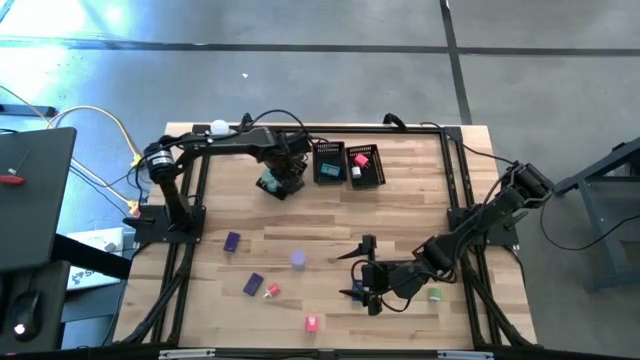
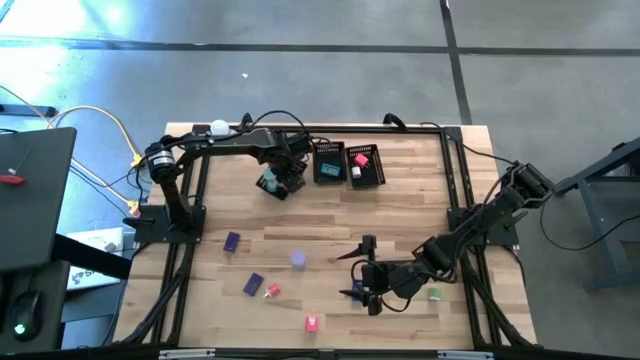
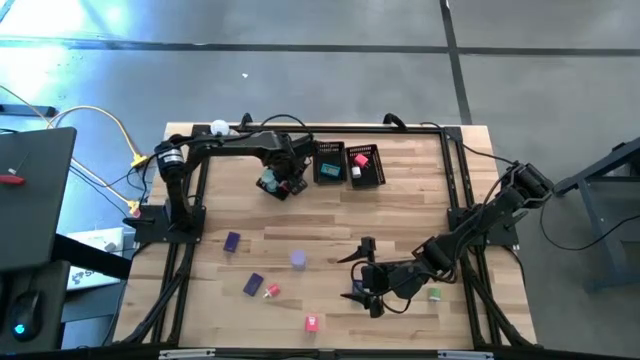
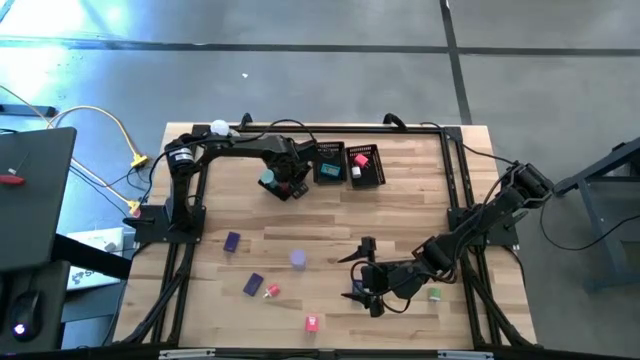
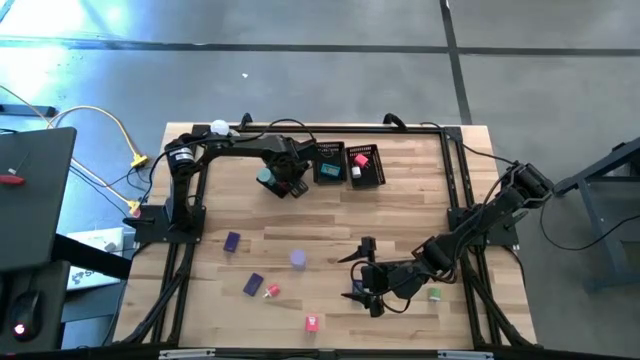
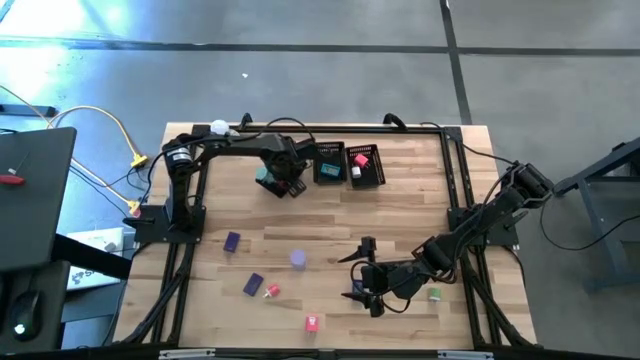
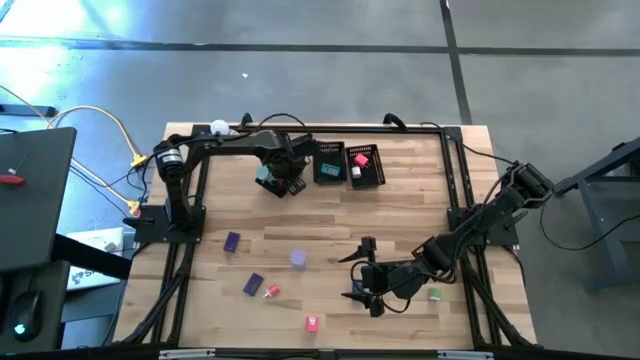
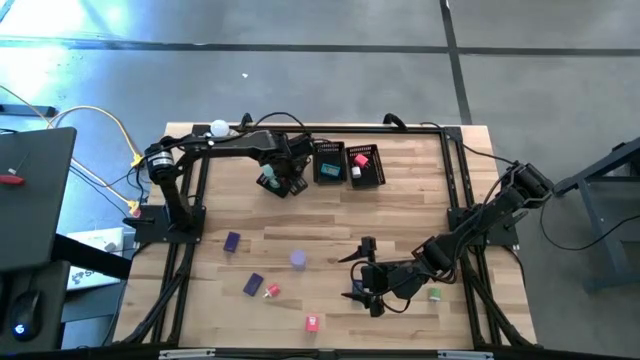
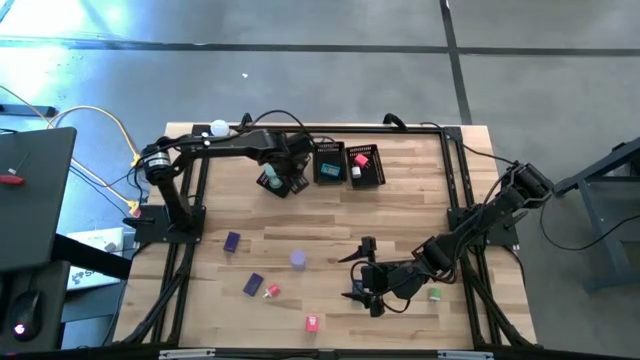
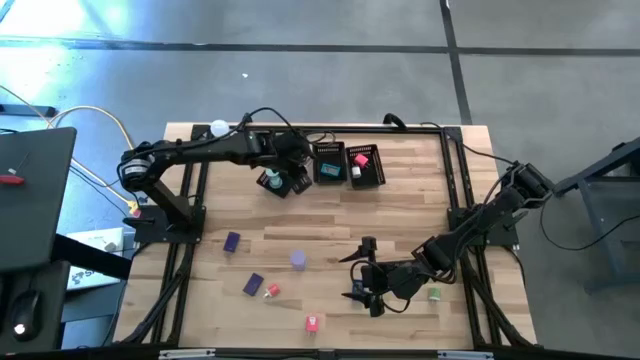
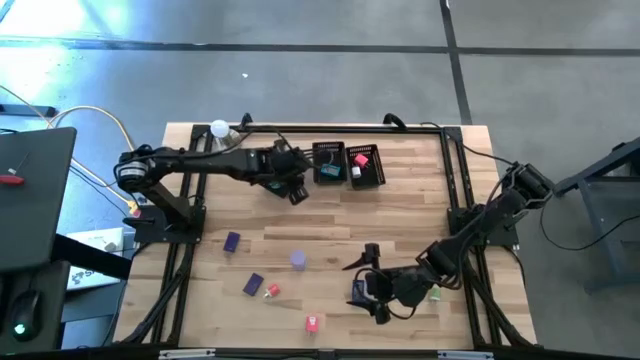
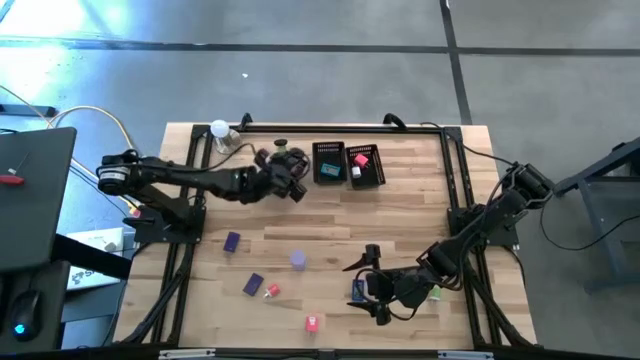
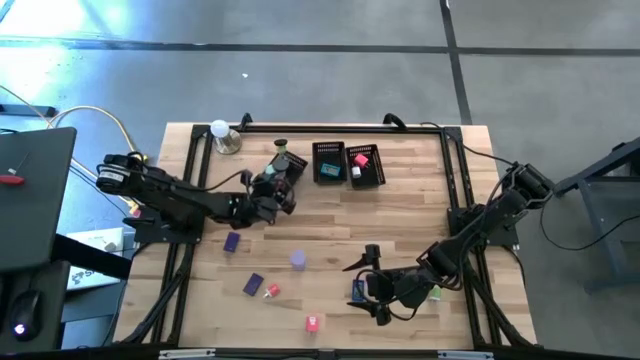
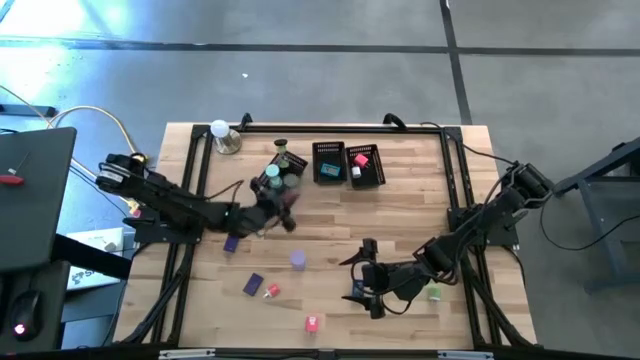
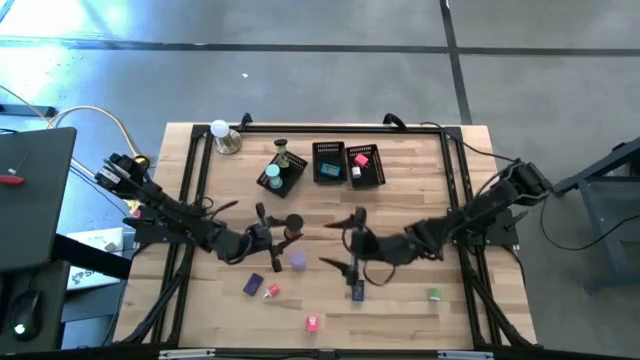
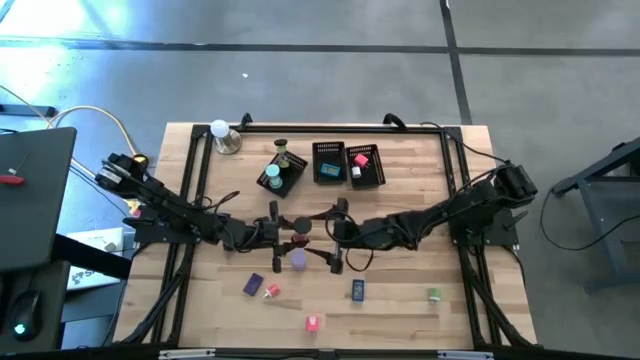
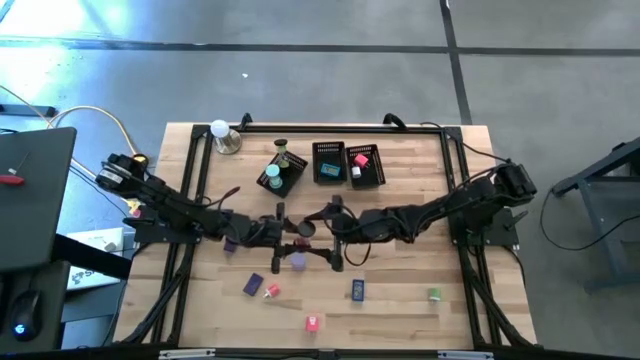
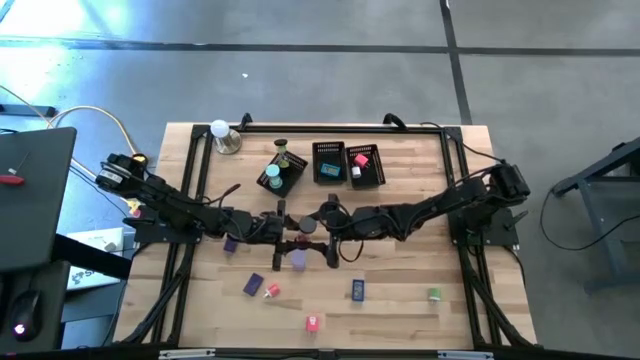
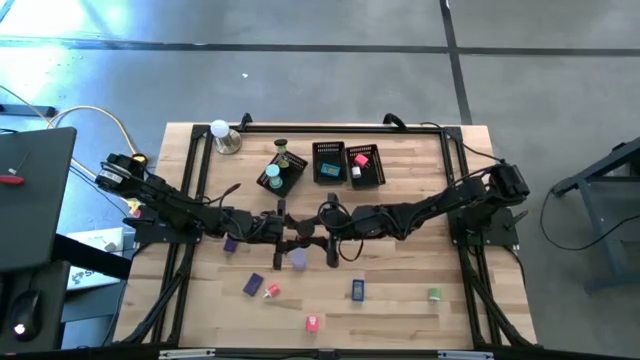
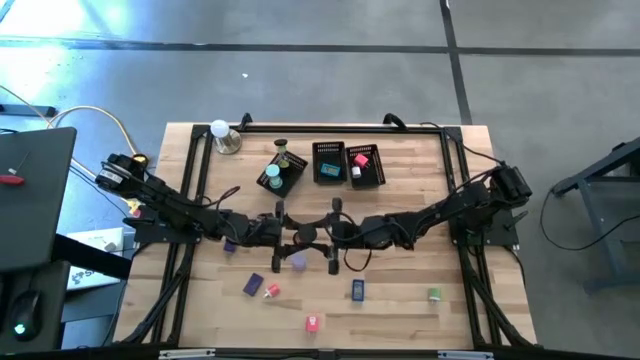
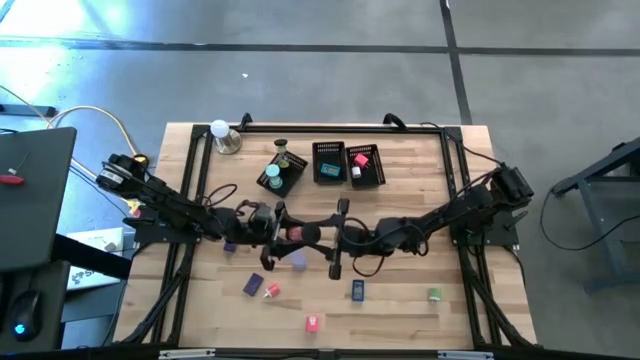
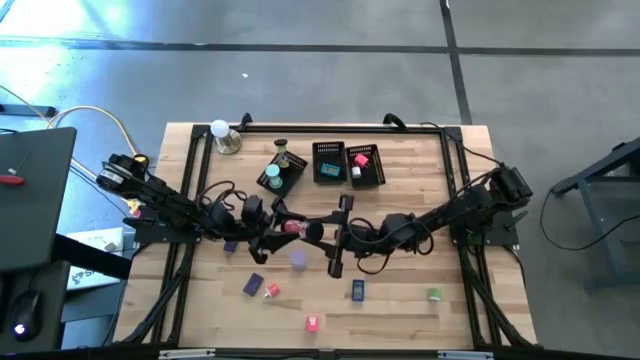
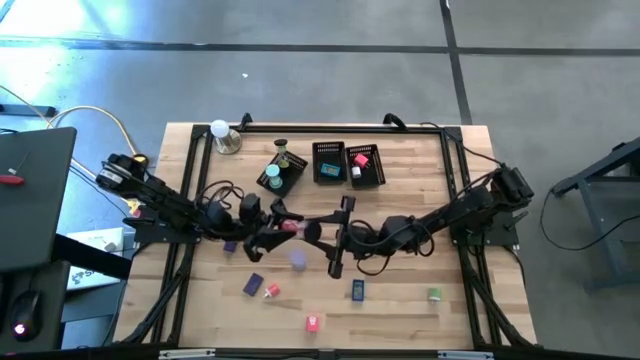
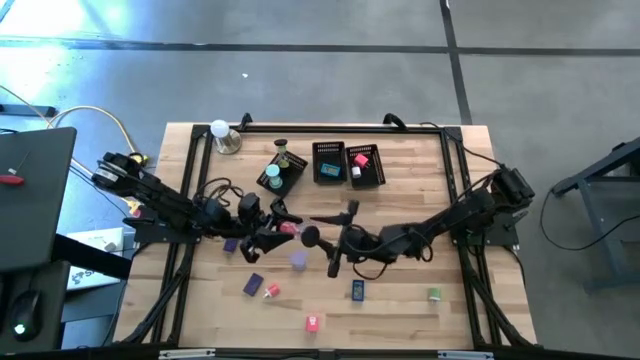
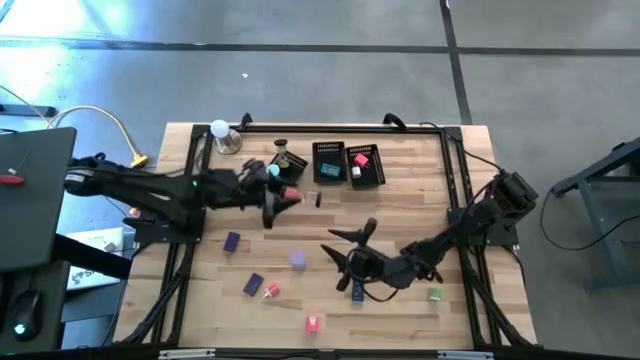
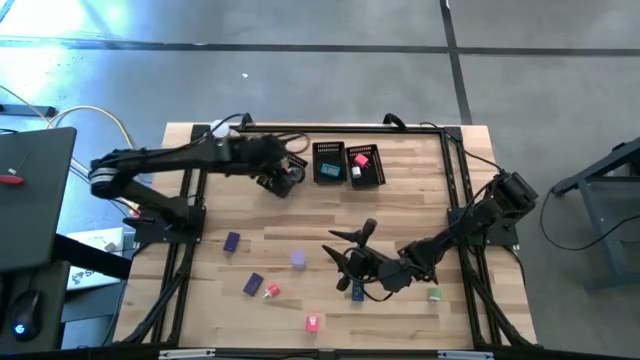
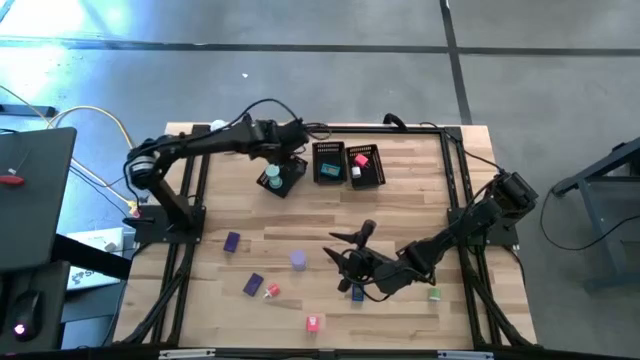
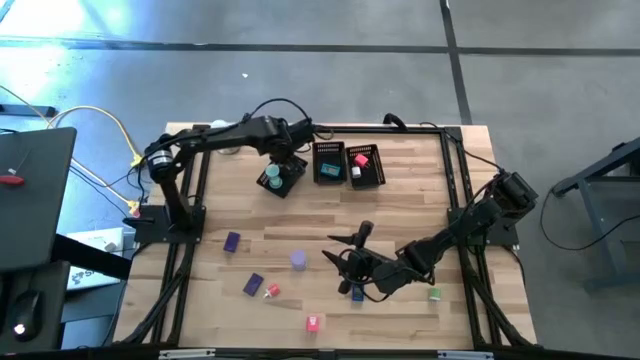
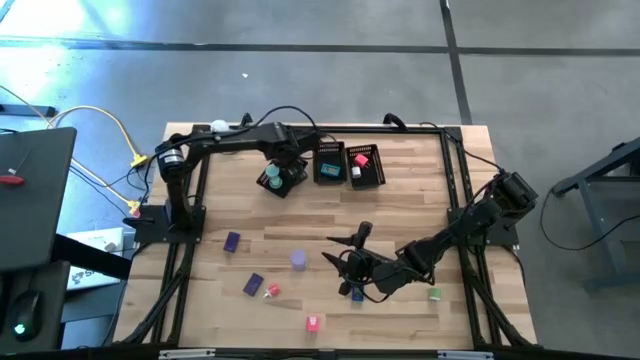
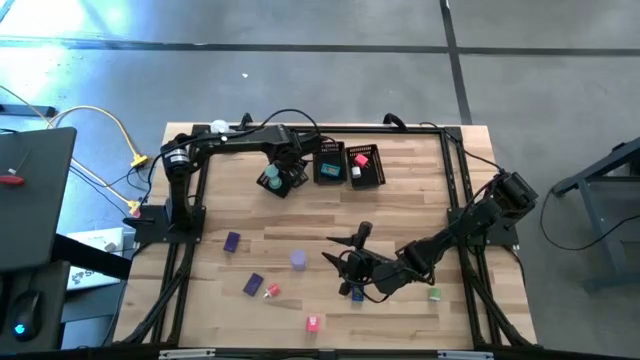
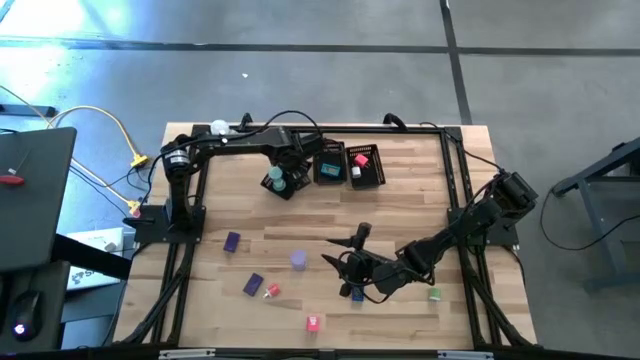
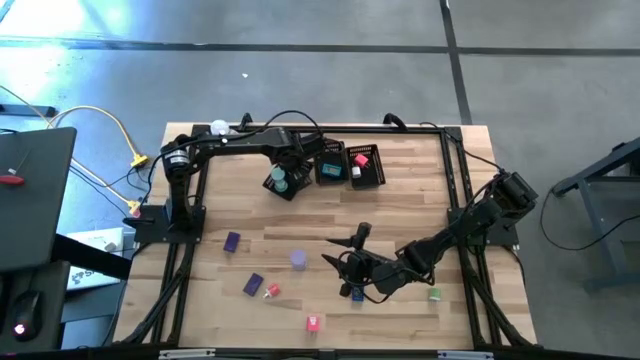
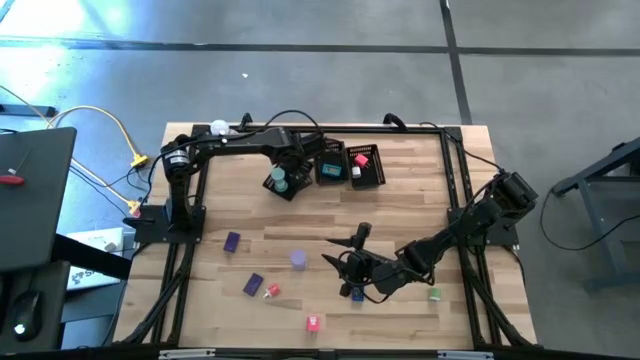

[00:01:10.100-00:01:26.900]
Task: Pick & Place Office items
Put the red and black hourglass into the left black bin

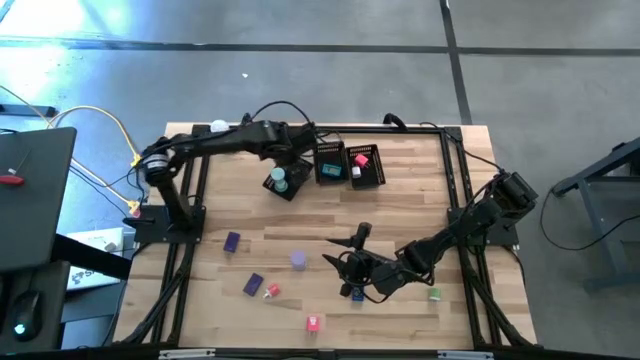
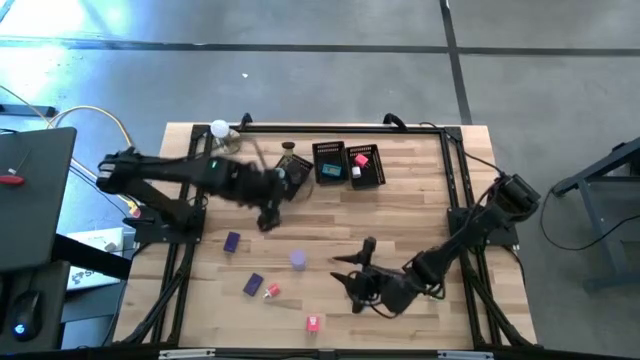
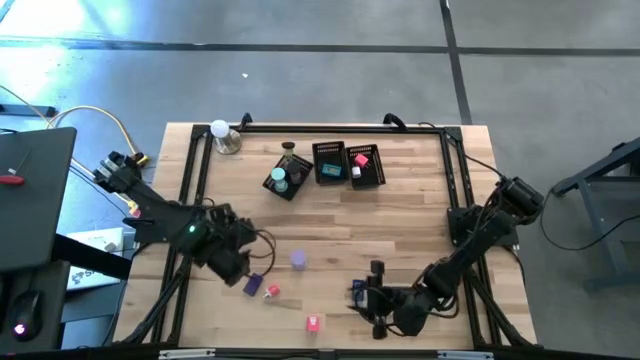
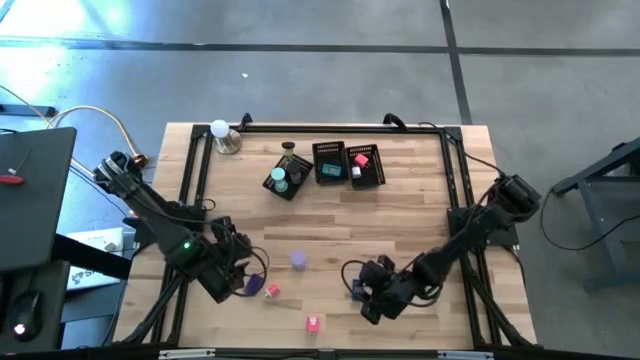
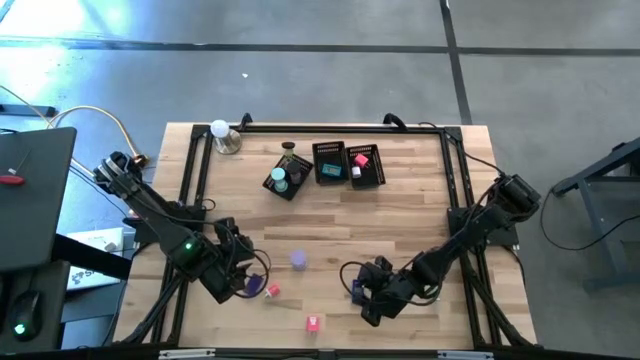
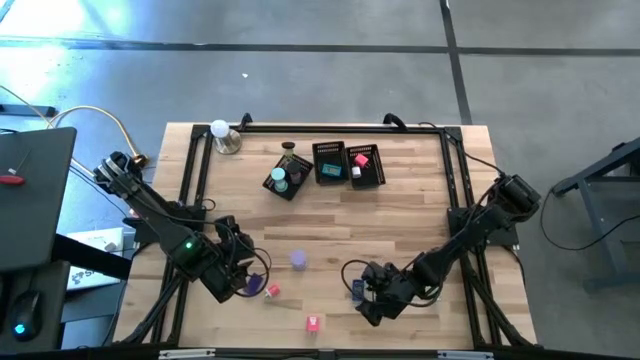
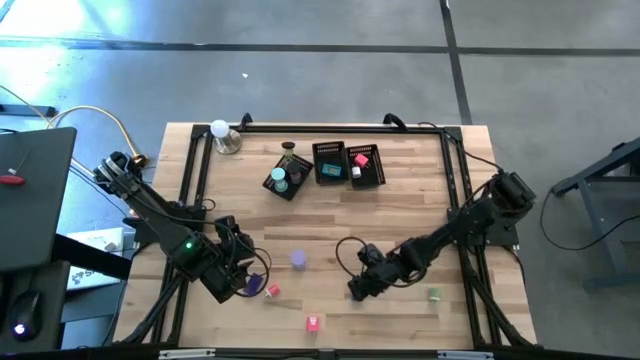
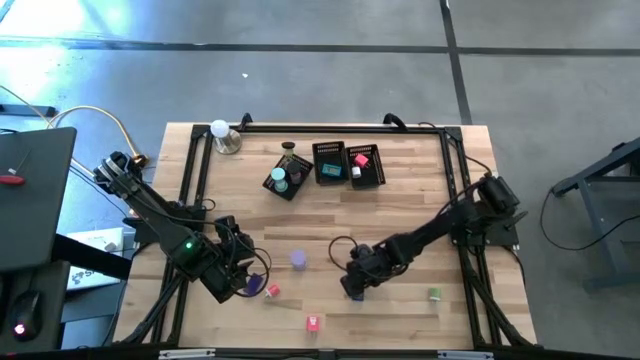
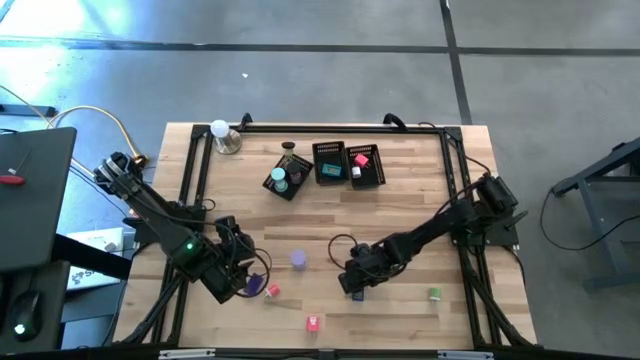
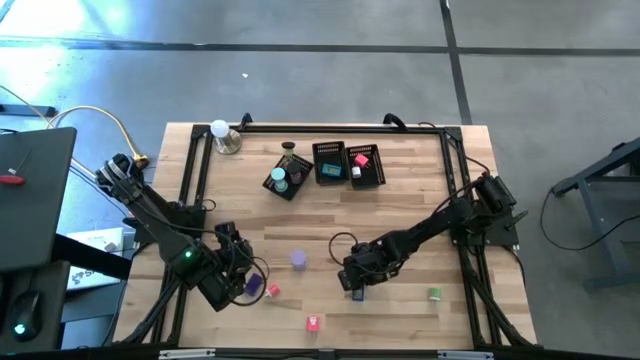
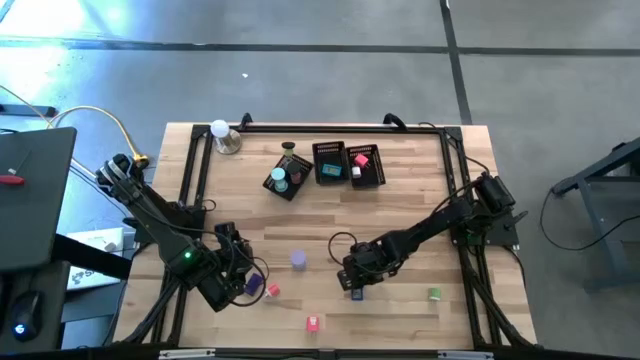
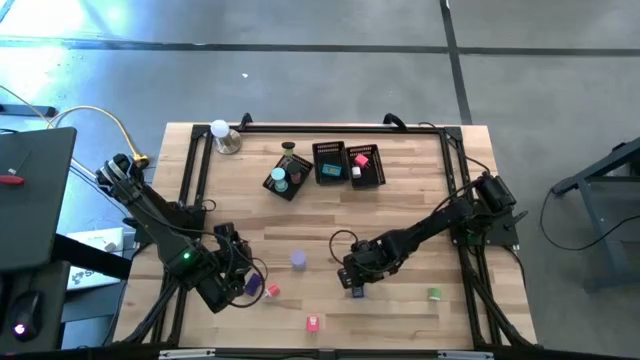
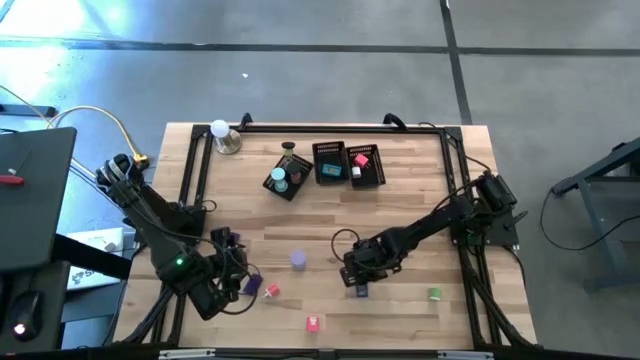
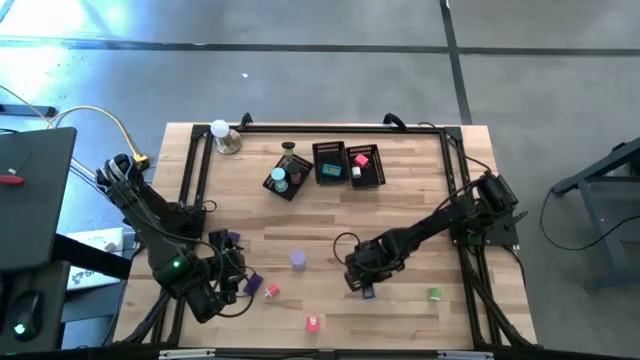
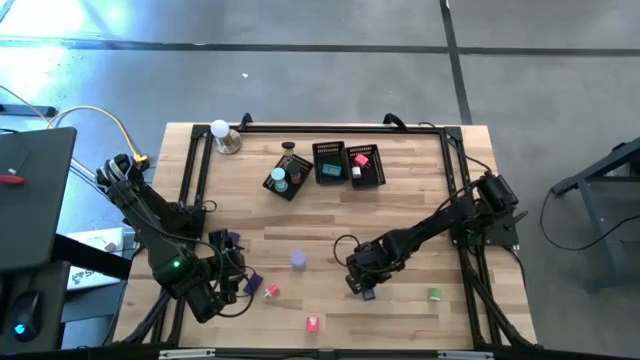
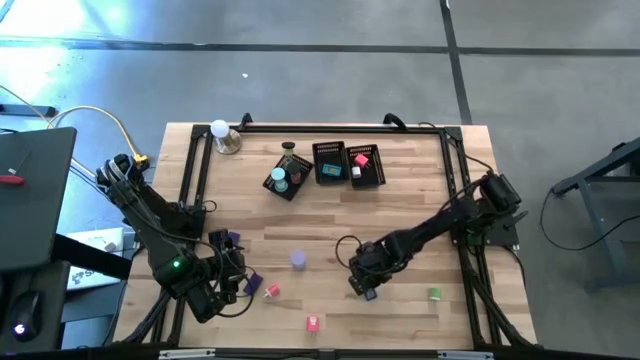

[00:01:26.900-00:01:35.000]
Put the blue digital timer into the middle black bin
